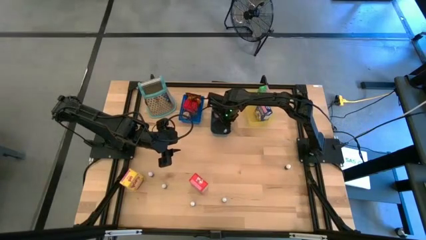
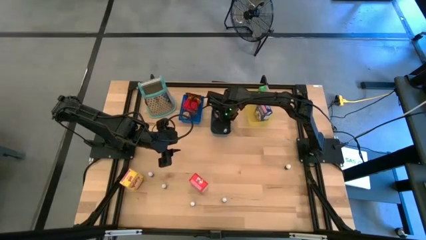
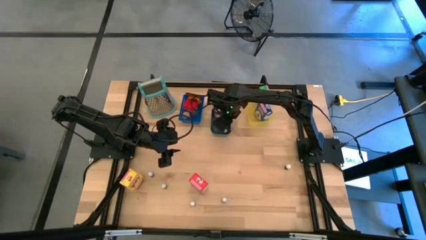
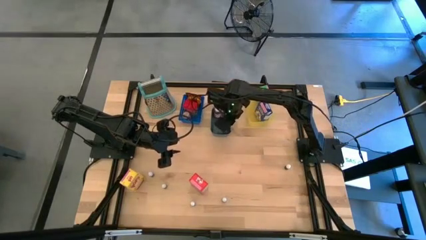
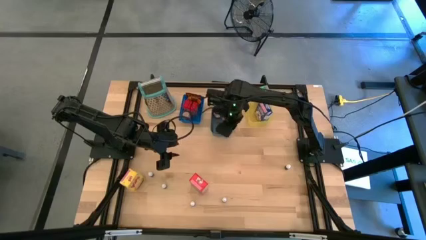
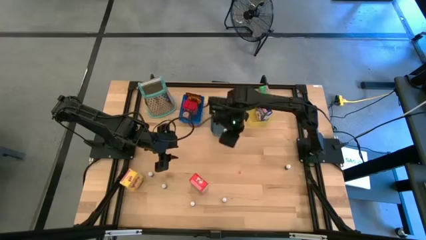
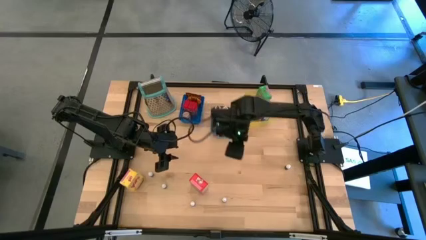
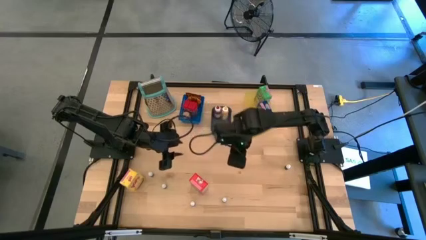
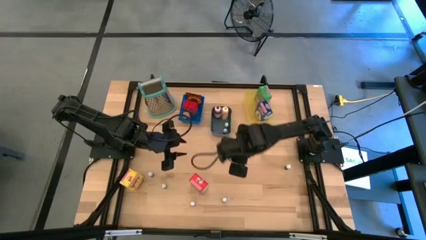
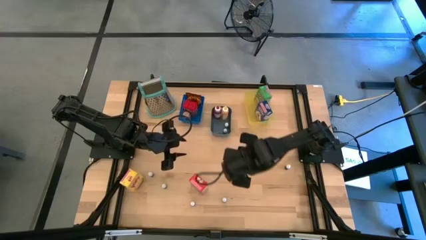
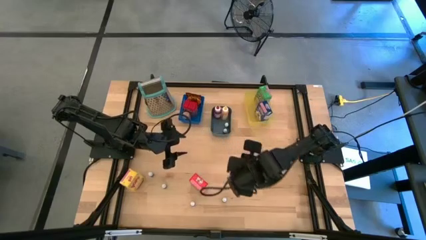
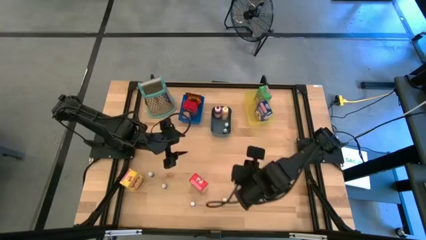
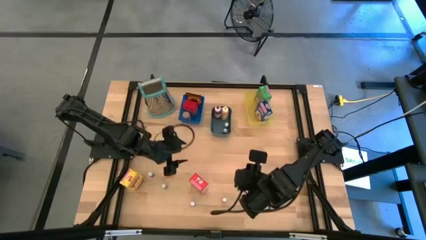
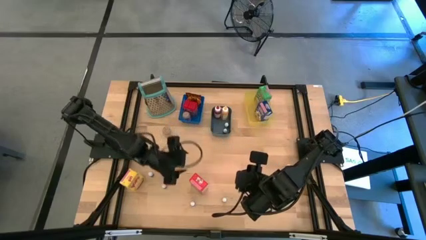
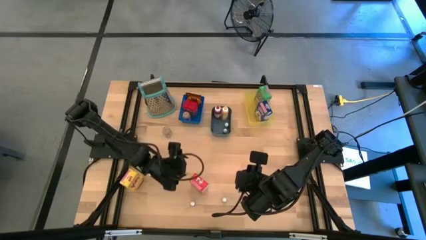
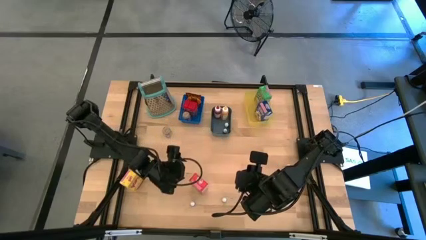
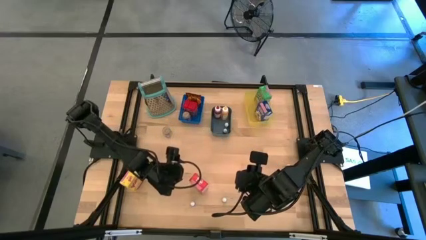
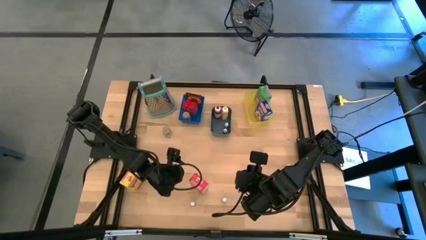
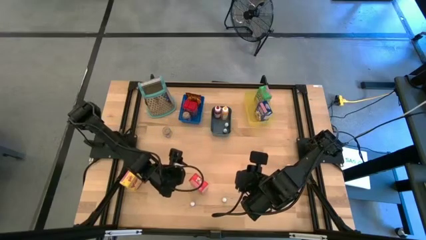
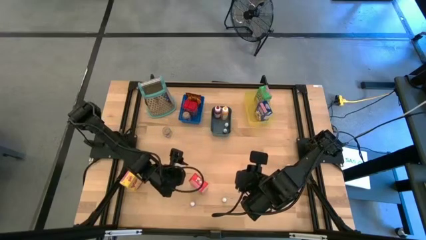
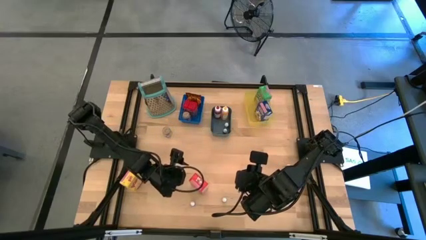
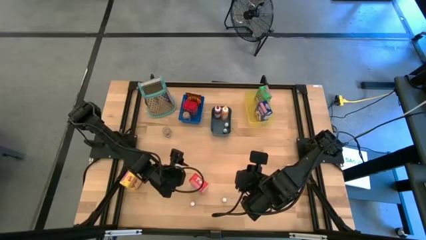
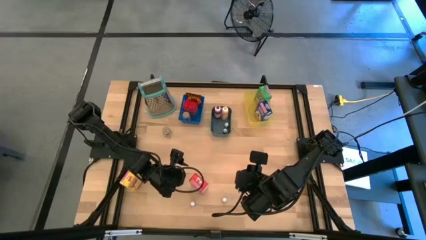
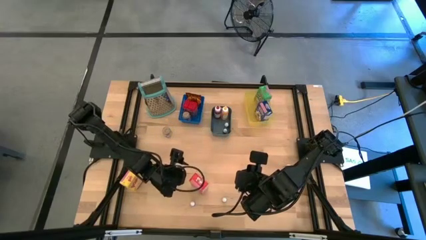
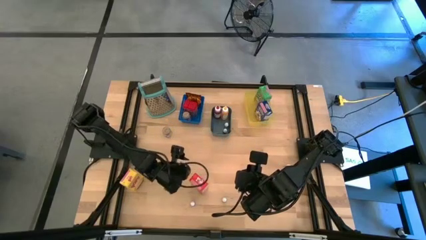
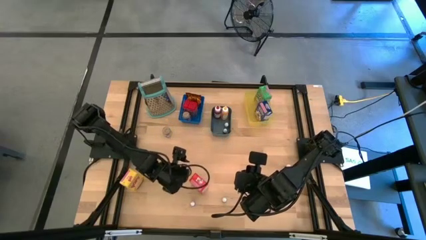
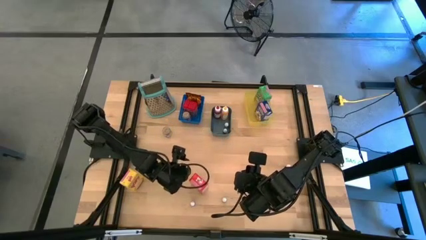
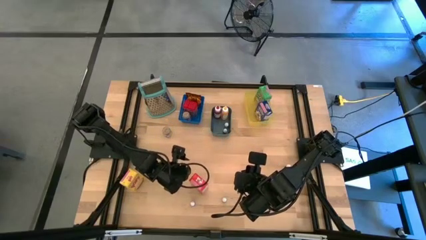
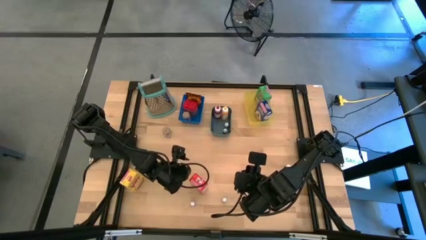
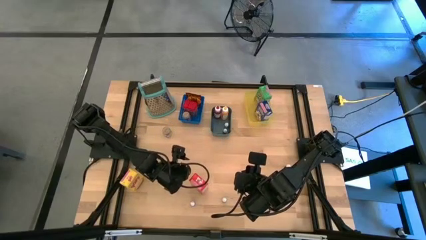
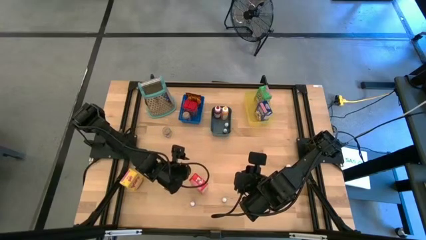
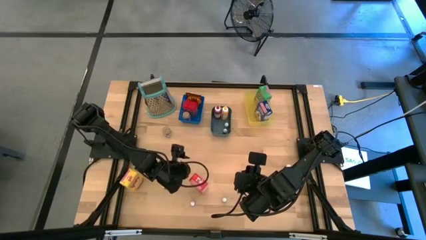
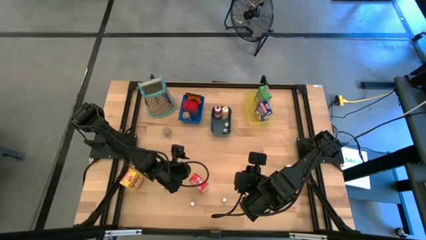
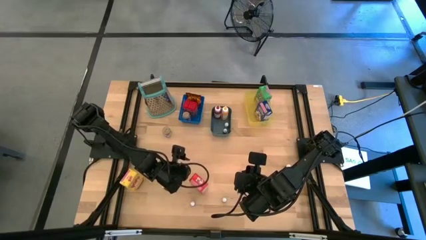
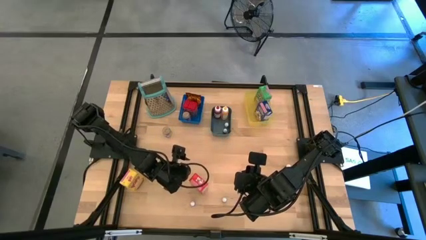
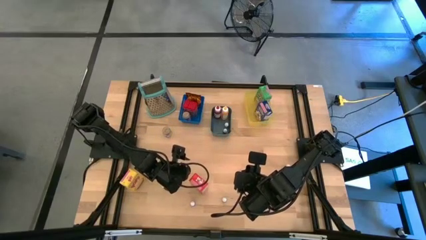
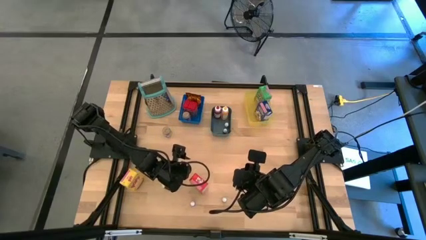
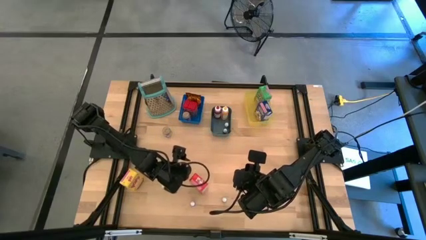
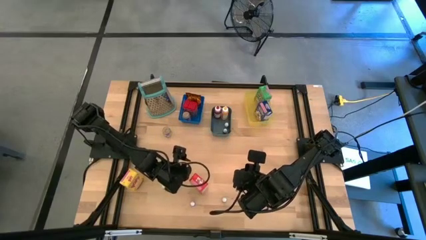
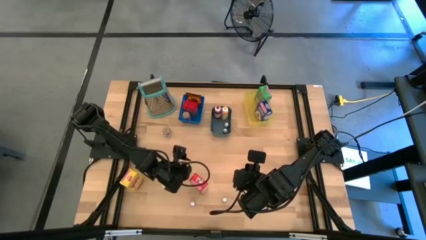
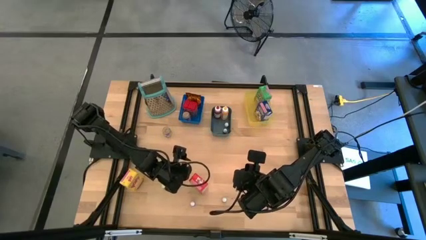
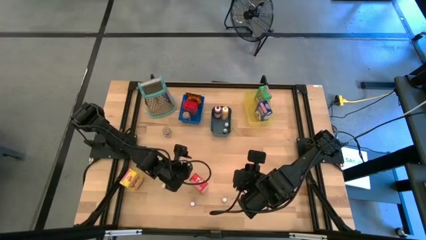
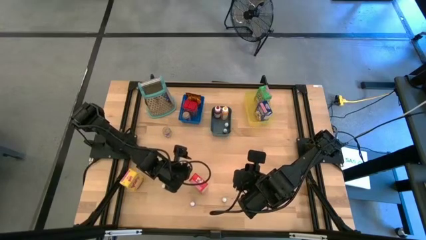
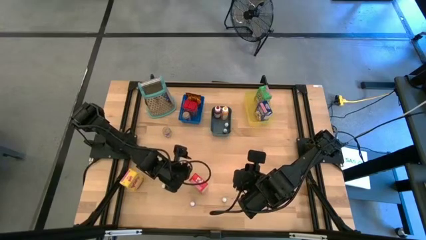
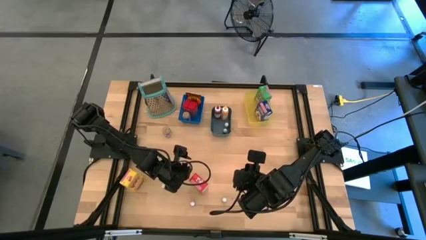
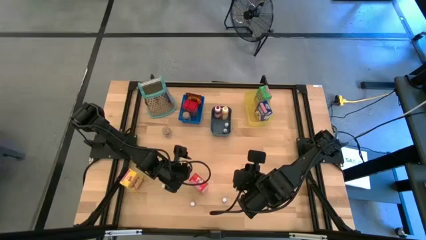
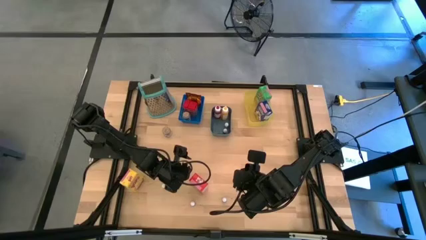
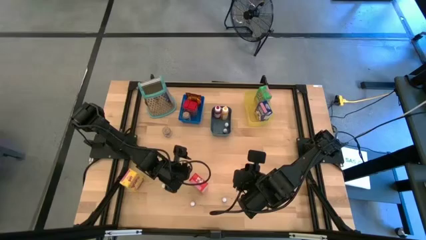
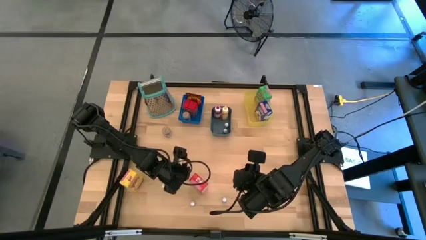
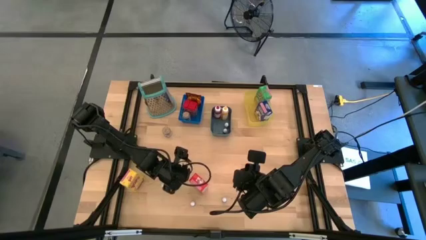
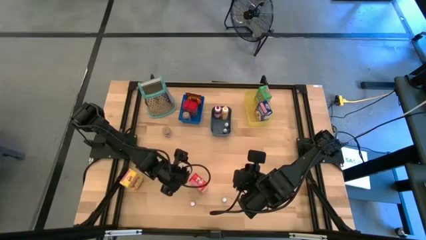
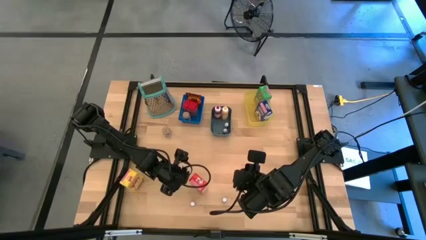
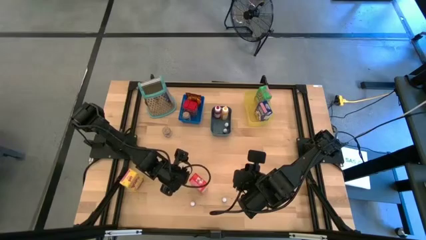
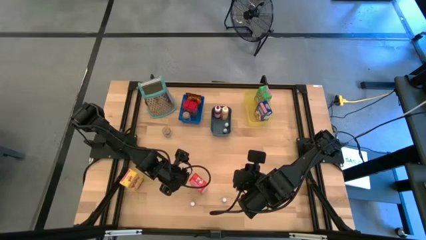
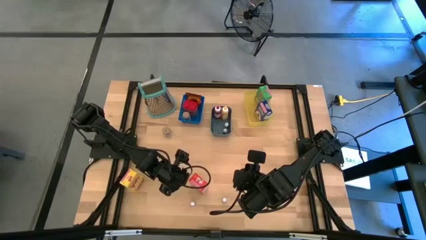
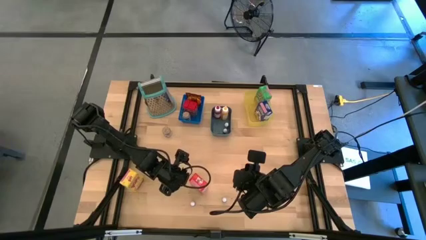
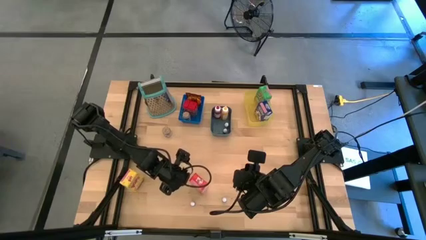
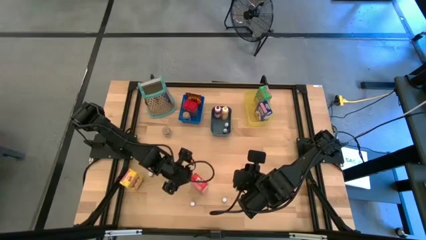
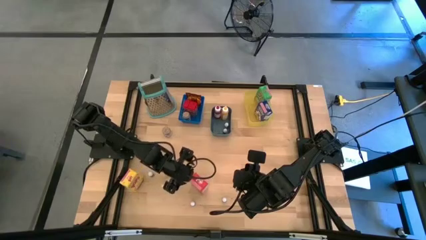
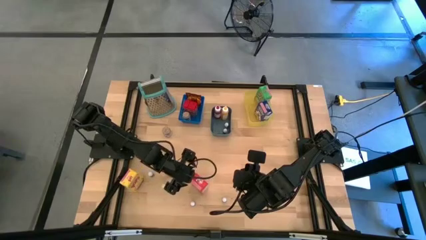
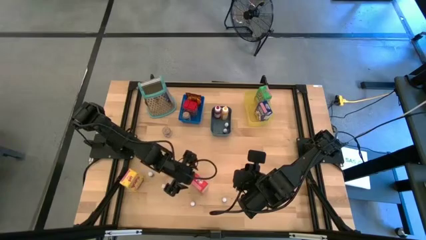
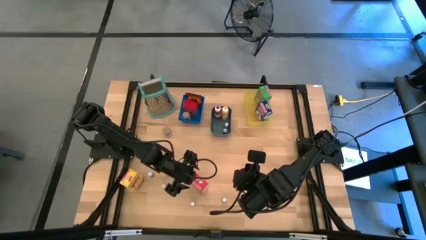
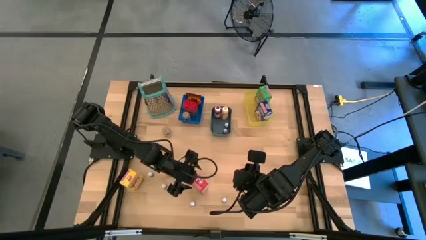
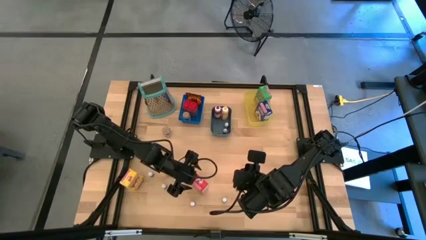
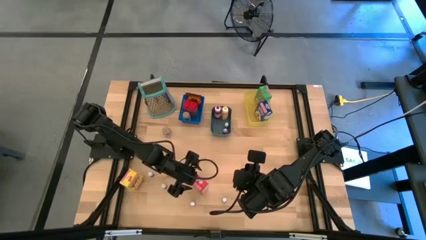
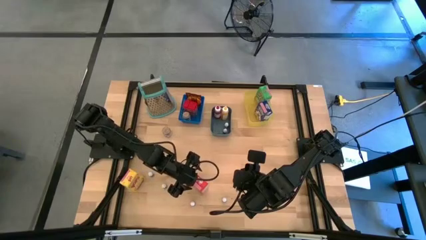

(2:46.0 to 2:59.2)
Task: Pick & Place Kitchen Items
Put the red cereal box into the yellow bin

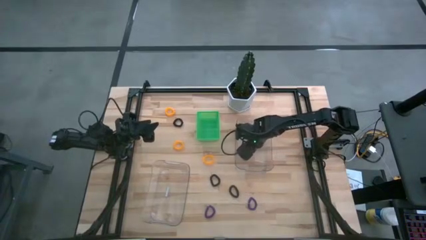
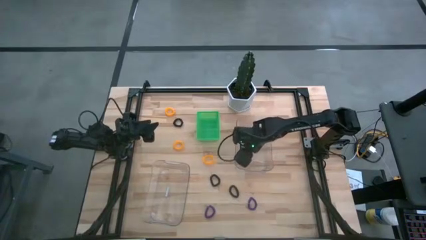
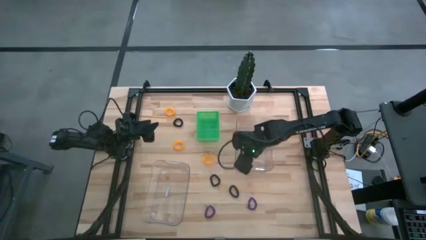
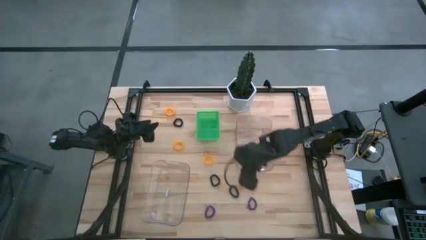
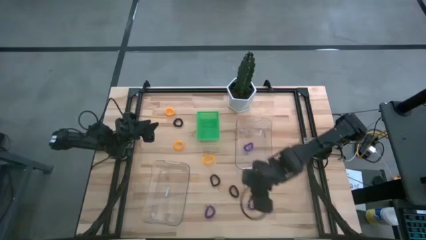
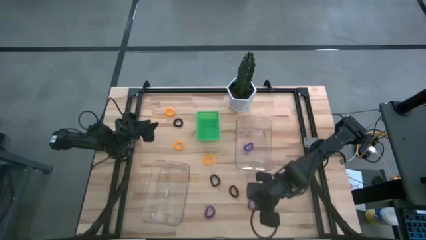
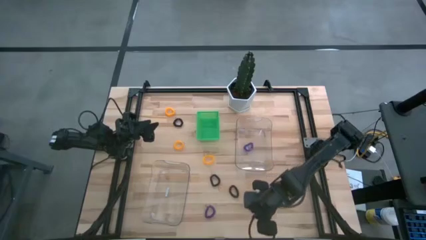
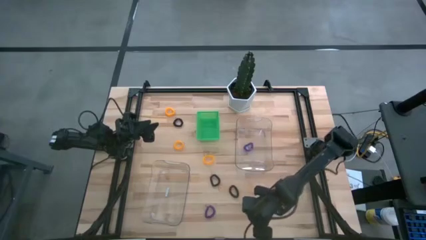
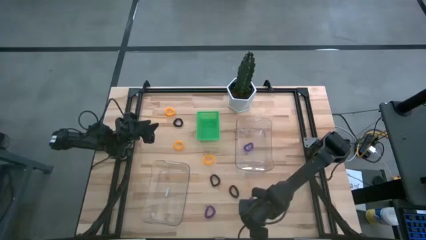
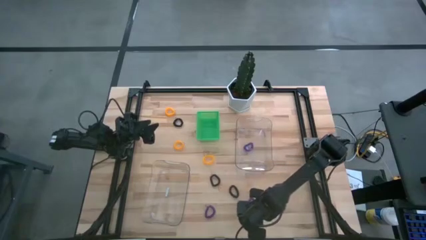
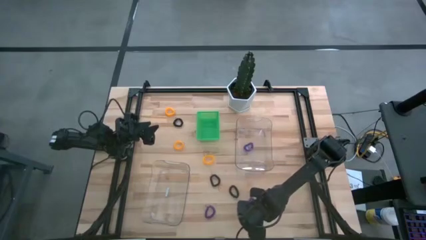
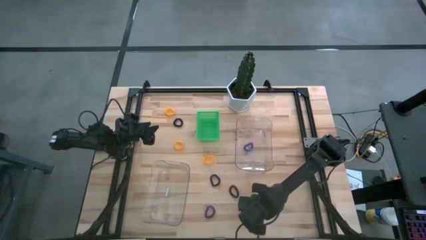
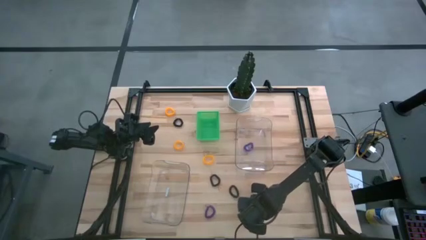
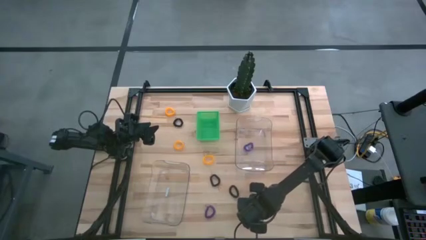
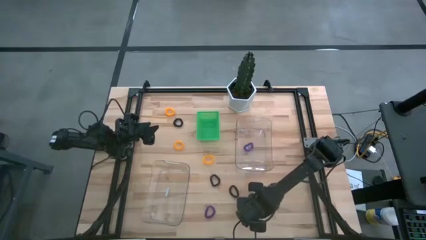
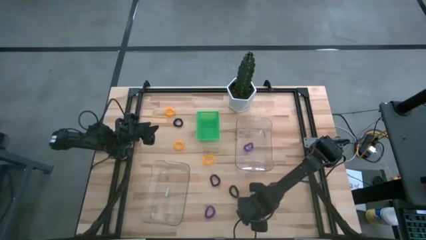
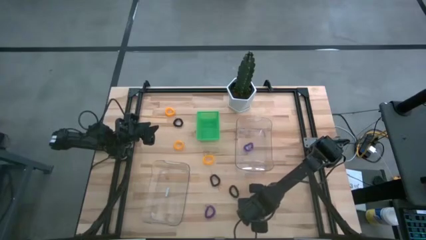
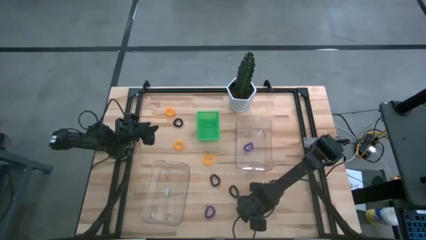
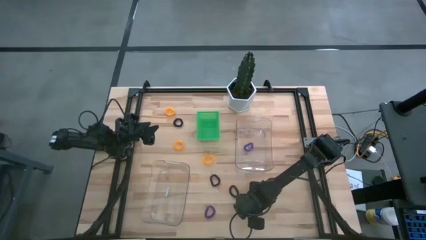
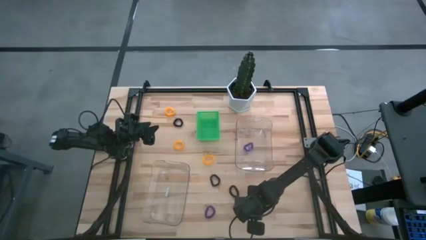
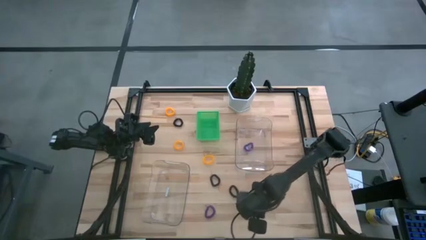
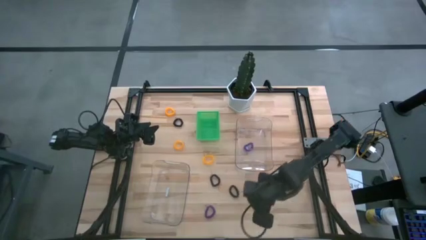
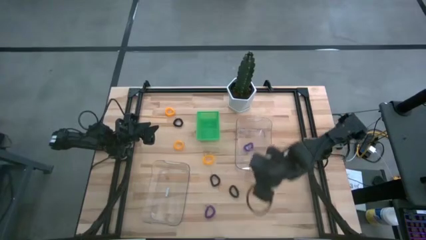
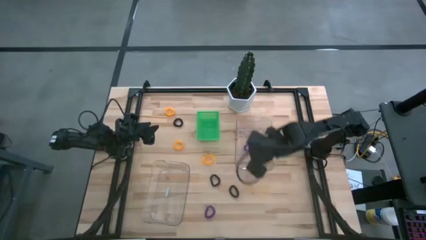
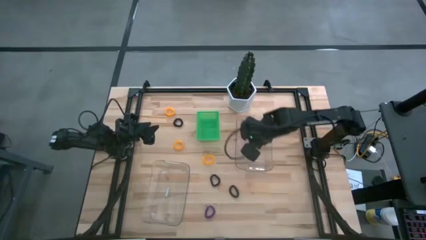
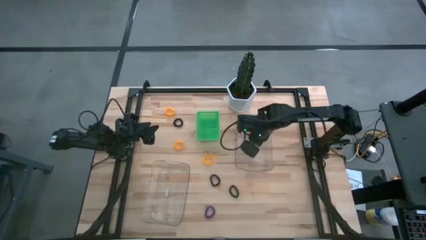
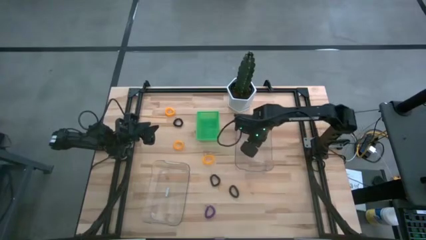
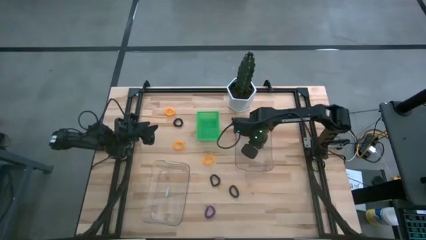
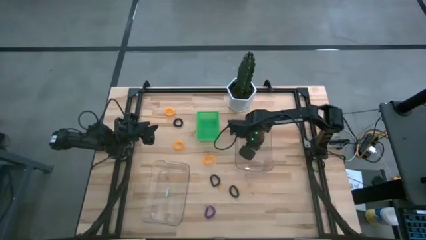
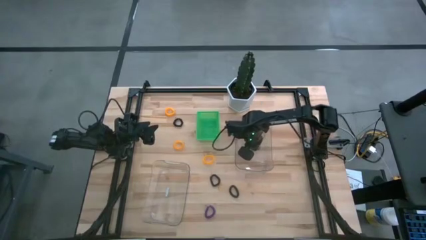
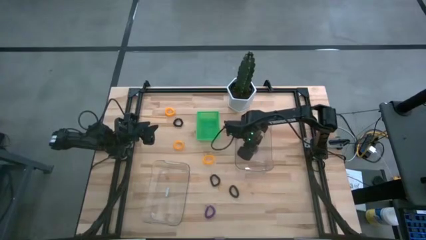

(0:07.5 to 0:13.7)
Task: Sort spring keychains
Put the purple spring keychain into the top transparent bin
